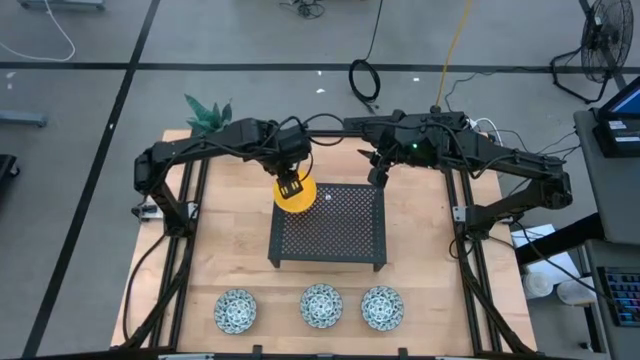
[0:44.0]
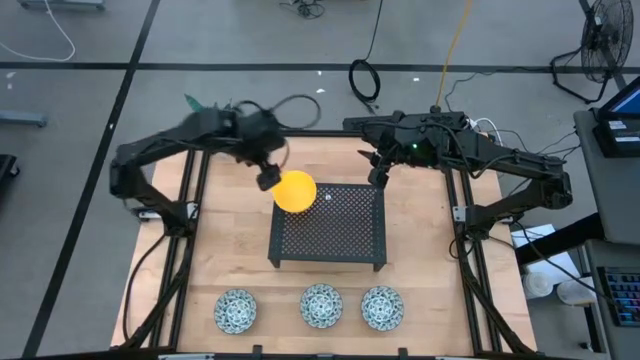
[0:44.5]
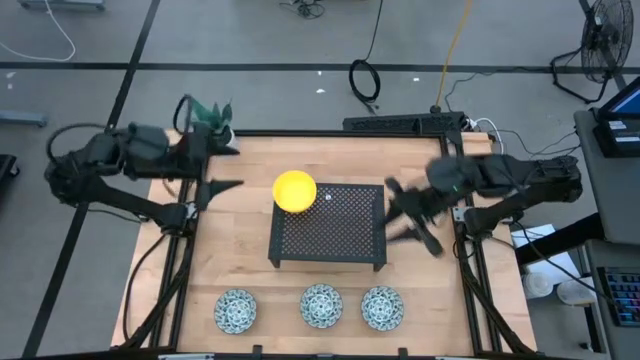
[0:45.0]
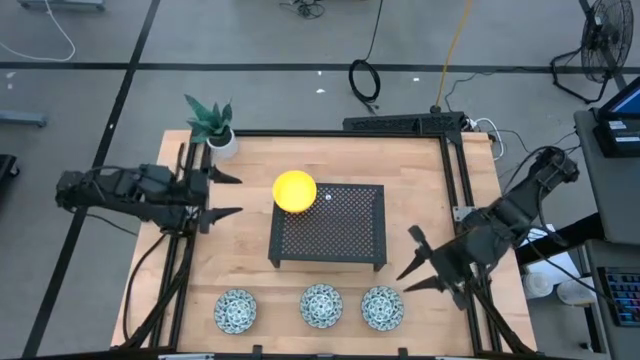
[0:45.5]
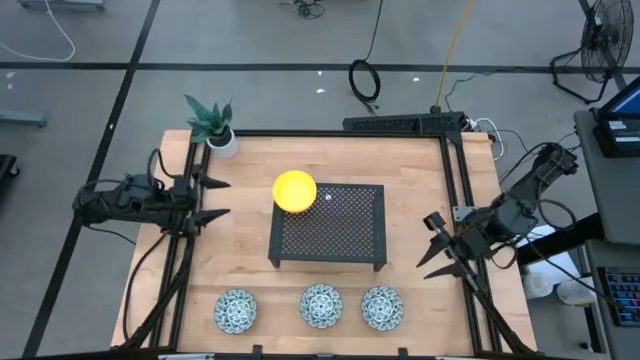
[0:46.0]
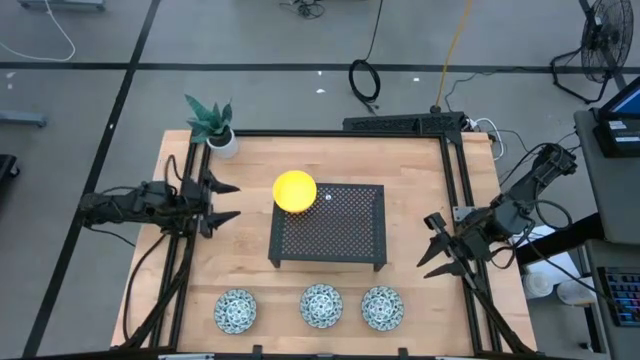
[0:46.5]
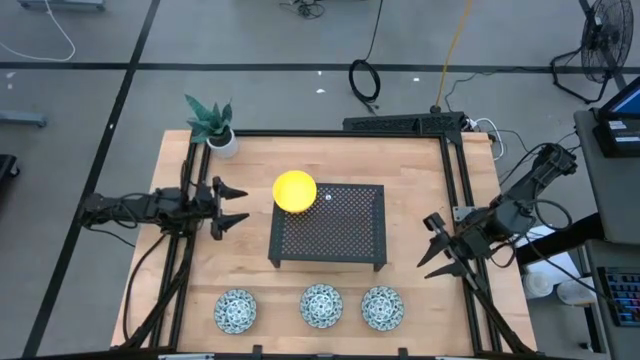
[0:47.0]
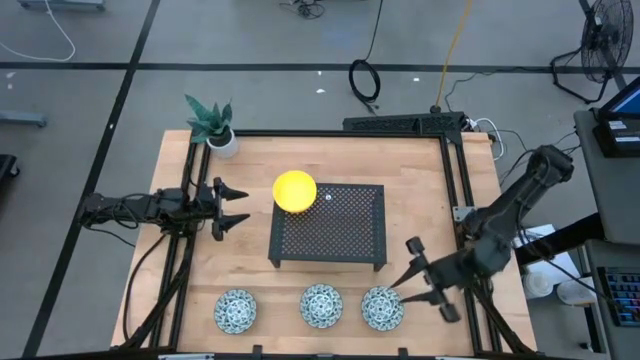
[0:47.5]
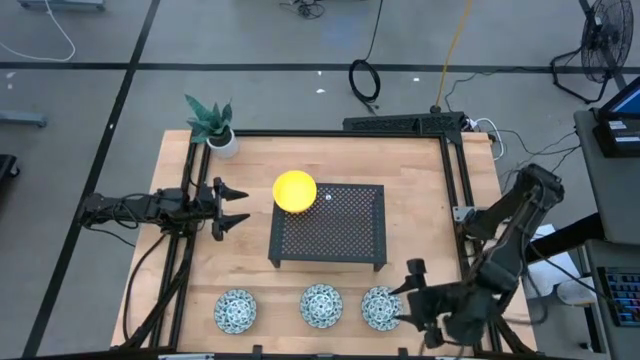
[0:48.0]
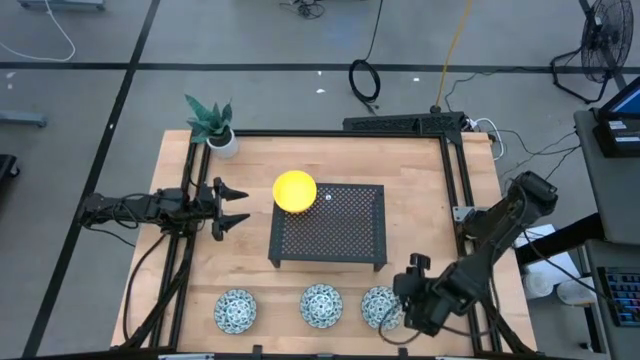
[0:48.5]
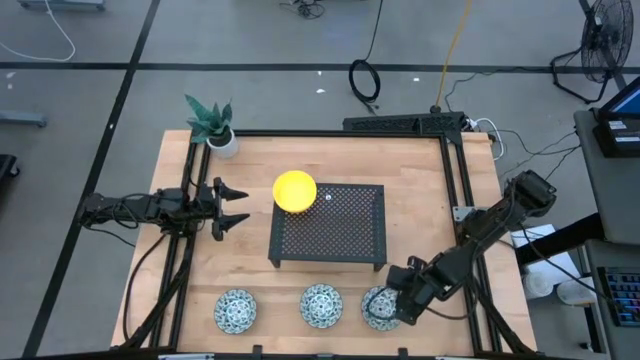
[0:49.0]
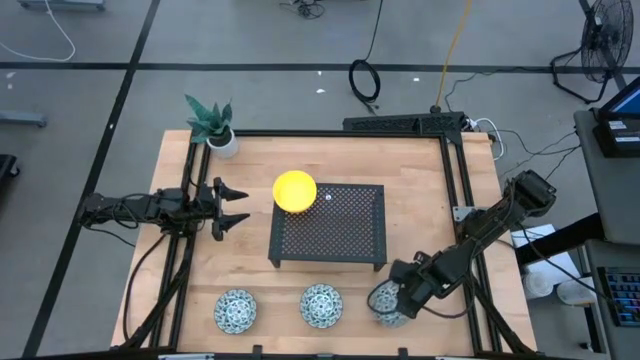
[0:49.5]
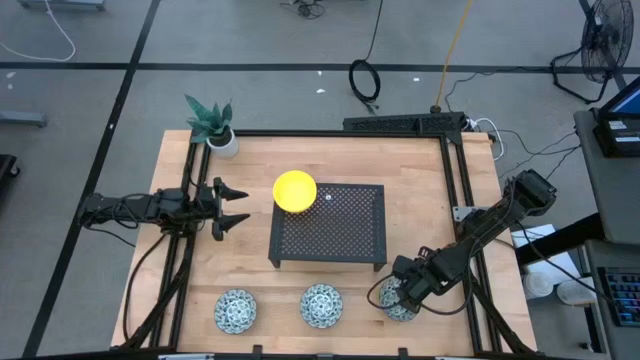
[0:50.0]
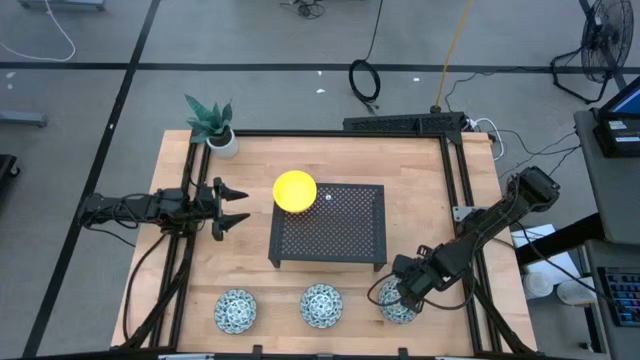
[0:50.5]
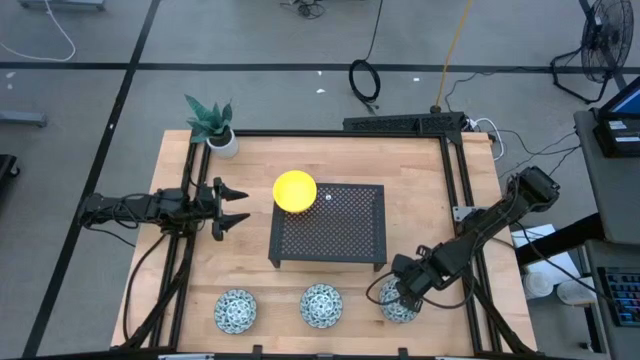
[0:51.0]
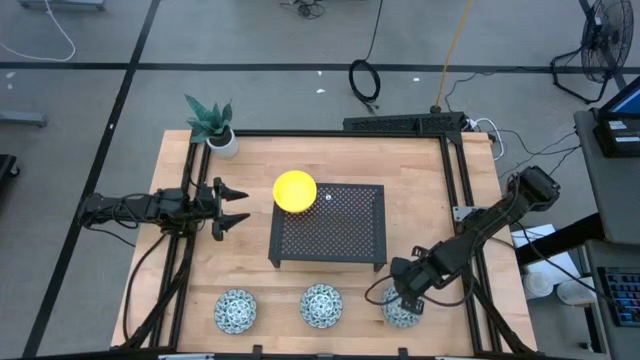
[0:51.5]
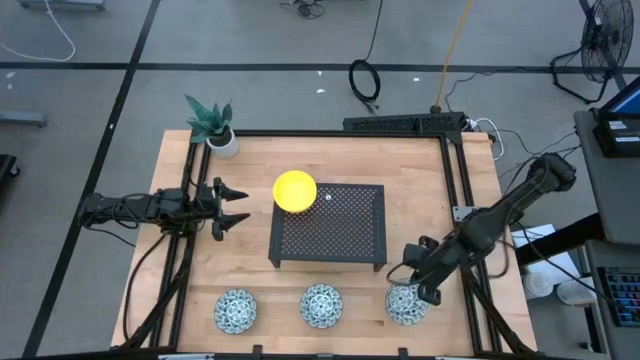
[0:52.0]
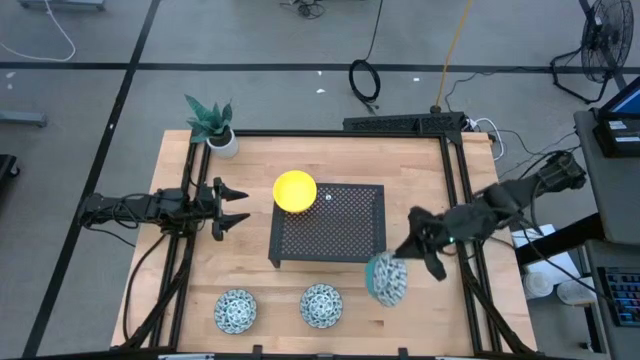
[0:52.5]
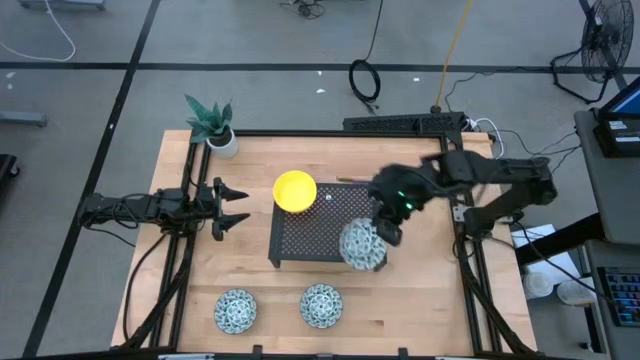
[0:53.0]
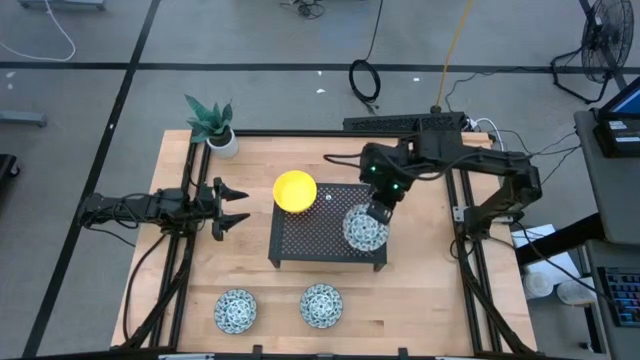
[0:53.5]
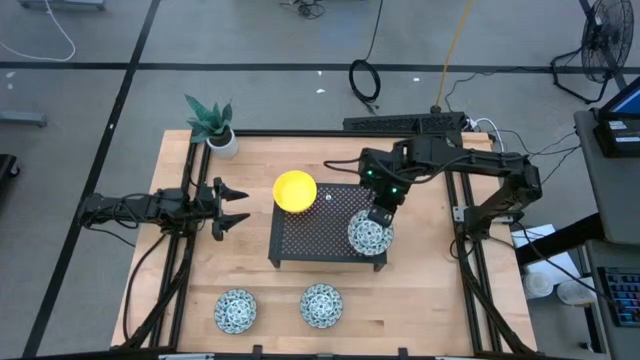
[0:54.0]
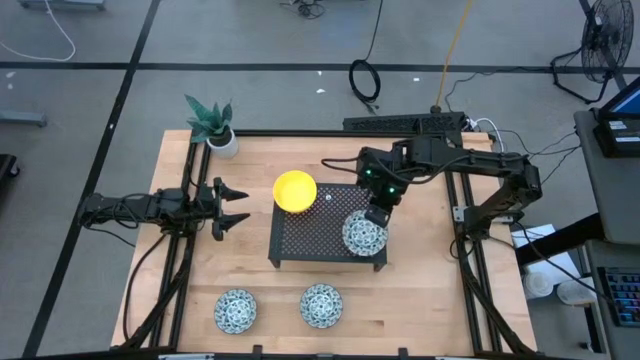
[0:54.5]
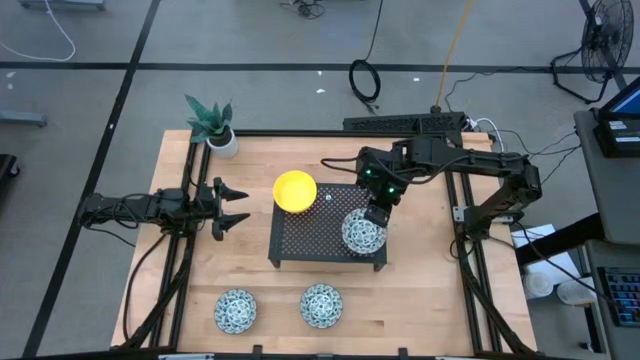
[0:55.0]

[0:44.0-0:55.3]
Task: Pick & Place Mini bowls
Put the right white patterned bowl on the shelf

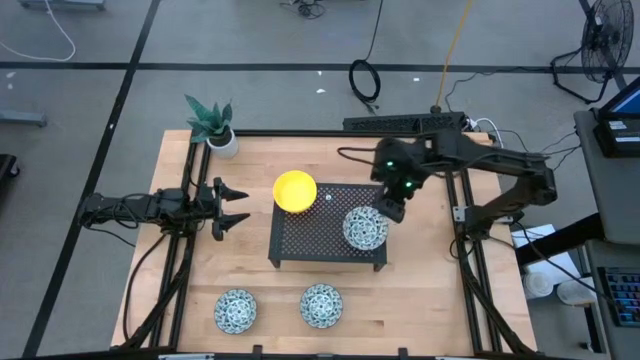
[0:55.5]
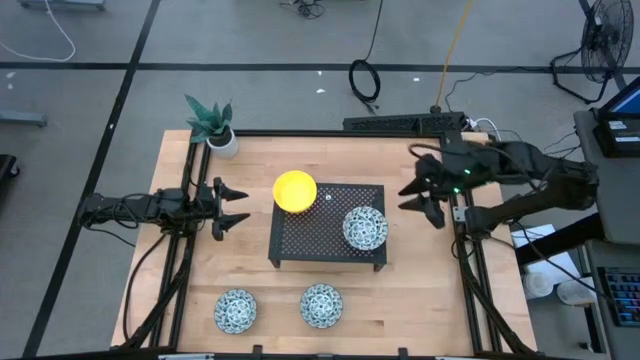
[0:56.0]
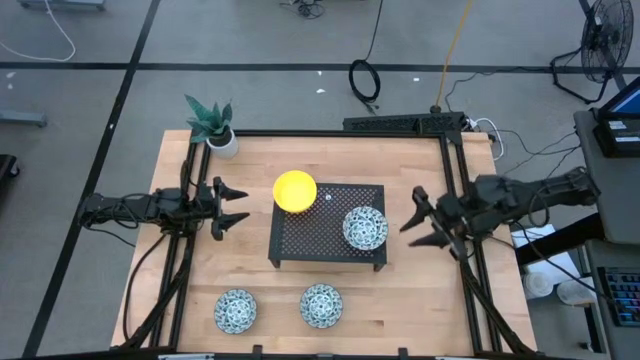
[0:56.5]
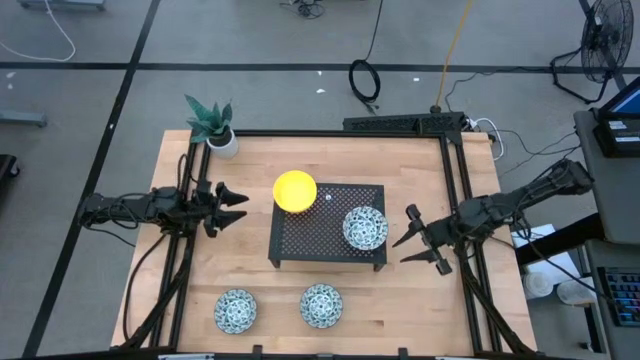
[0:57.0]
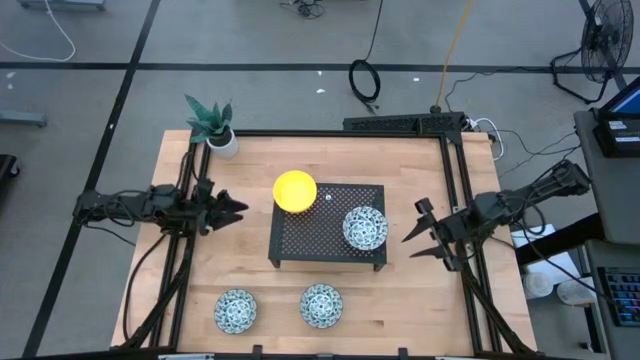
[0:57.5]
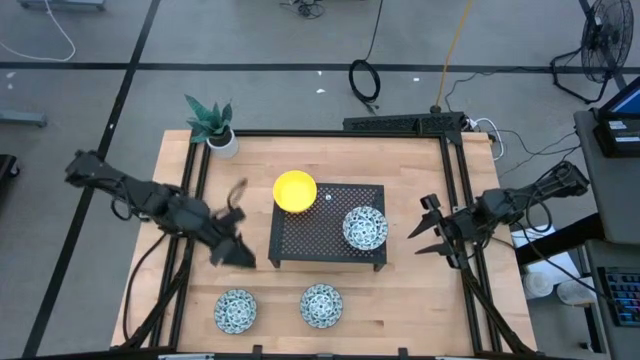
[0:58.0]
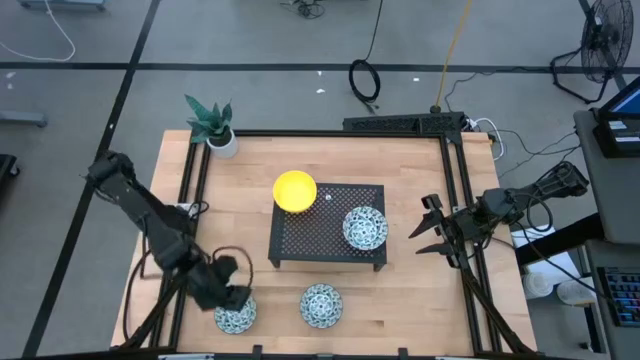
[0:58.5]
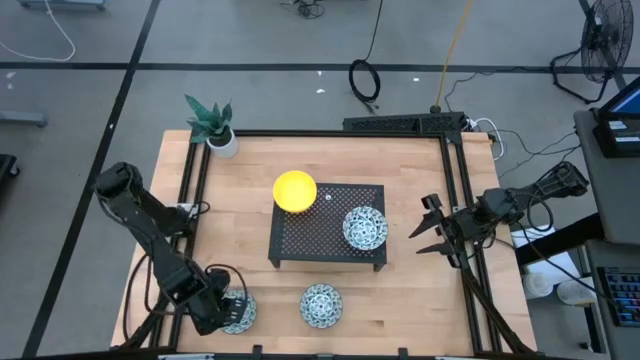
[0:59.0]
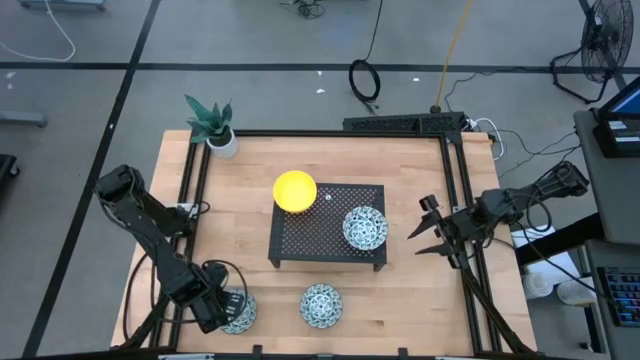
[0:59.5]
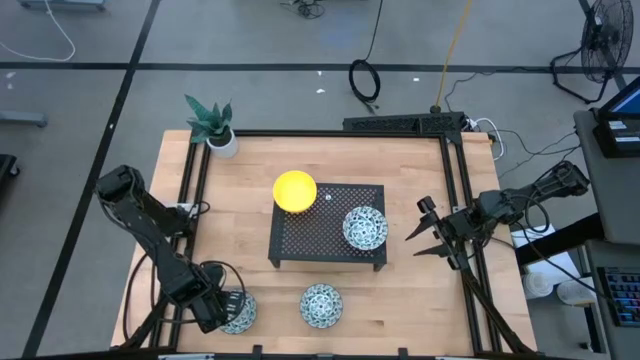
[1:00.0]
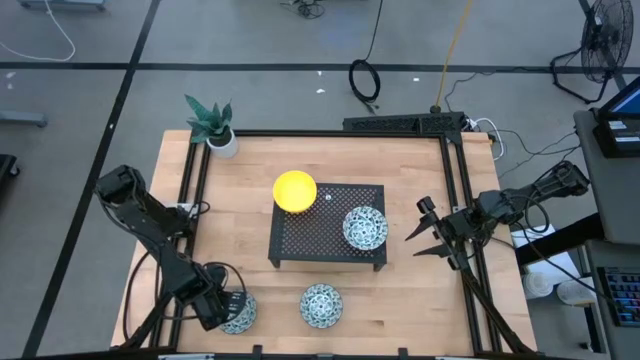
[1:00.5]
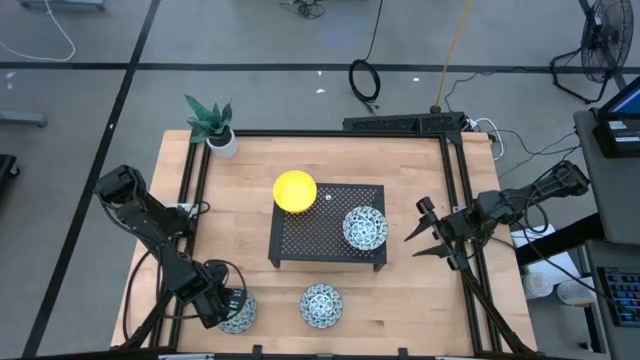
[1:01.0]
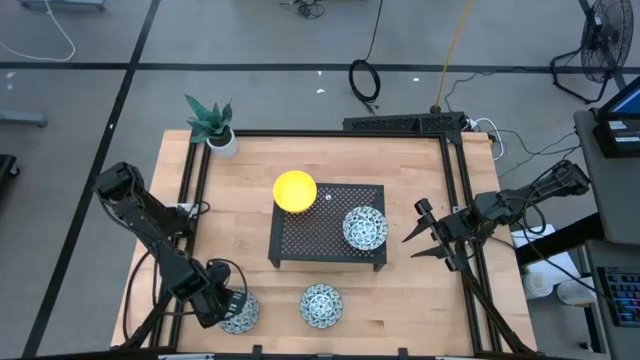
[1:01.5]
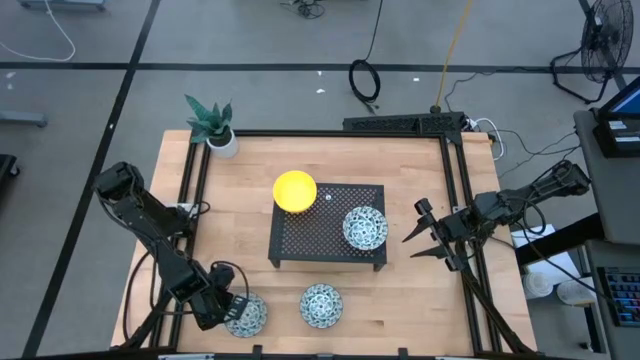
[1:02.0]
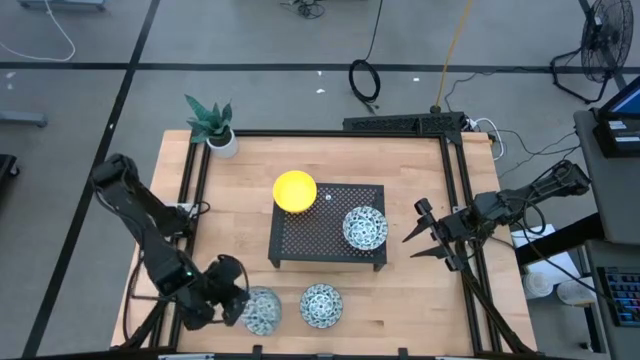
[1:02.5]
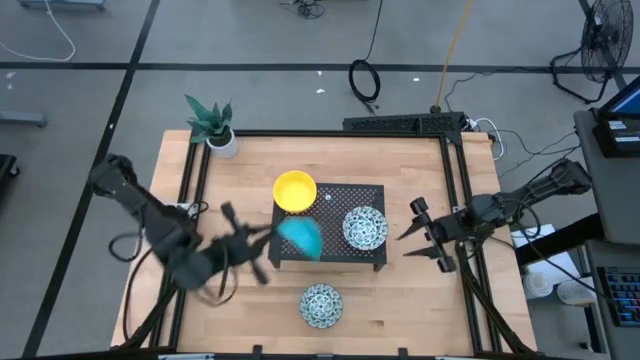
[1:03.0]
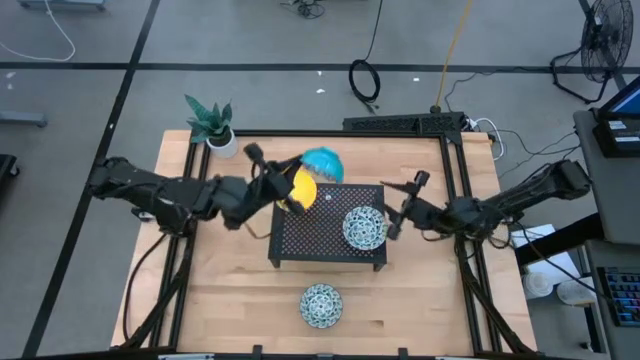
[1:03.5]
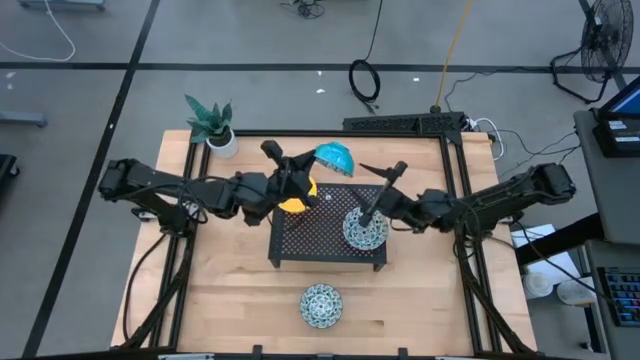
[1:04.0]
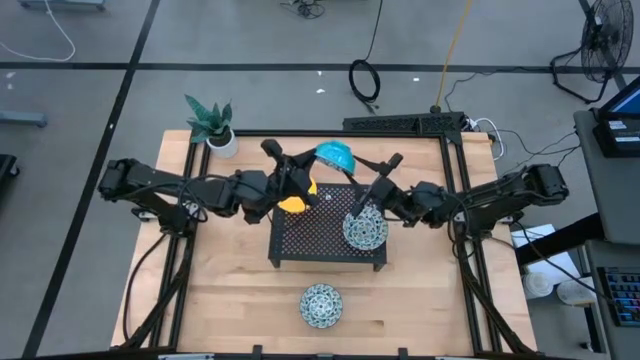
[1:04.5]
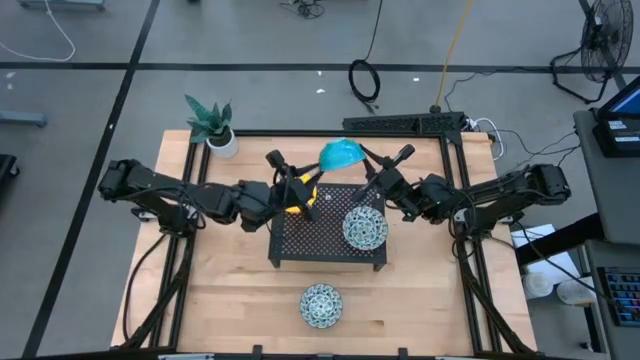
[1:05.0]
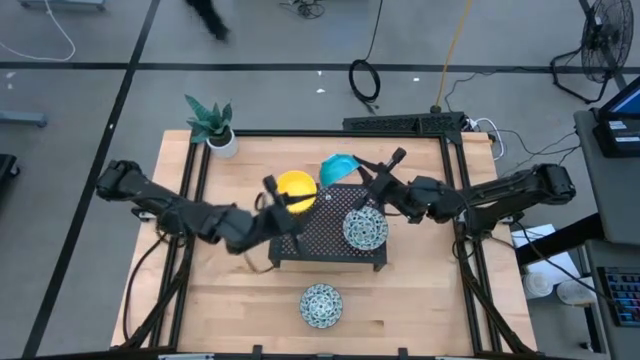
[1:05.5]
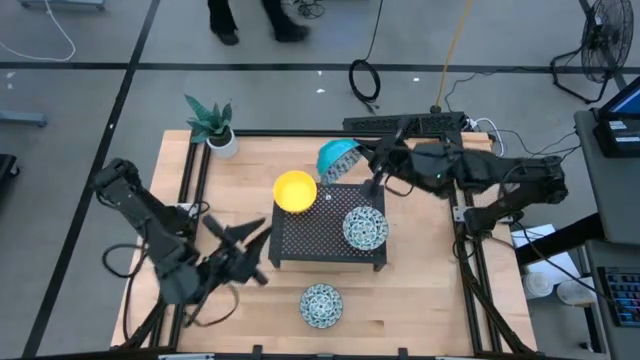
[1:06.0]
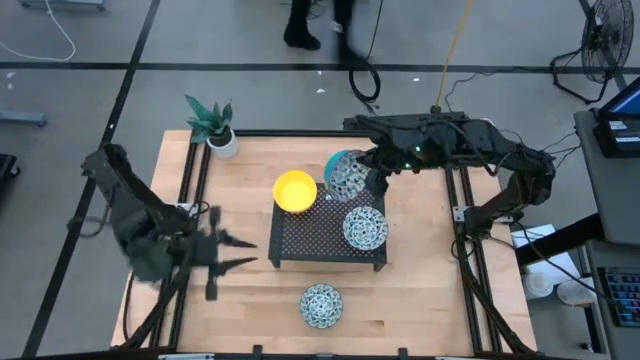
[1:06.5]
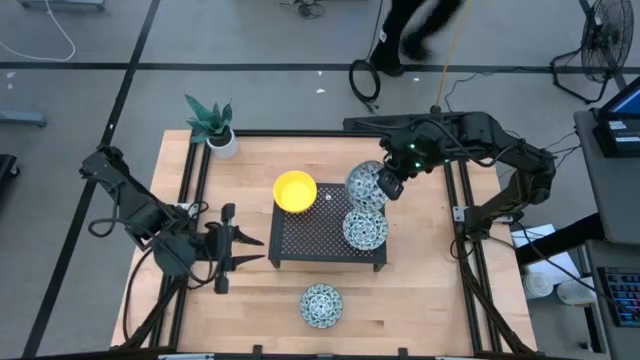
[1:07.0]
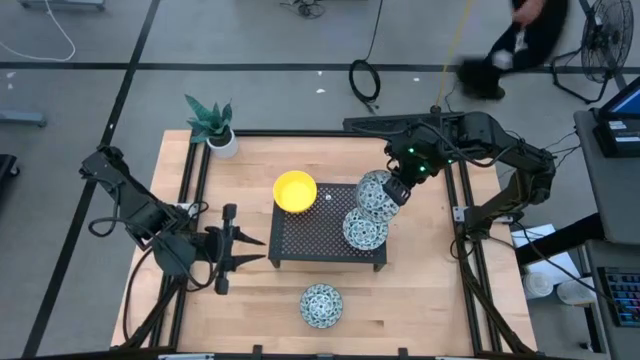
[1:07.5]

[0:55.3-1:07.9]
Stack the left white patterned bowl on top of the white patterned bowl
